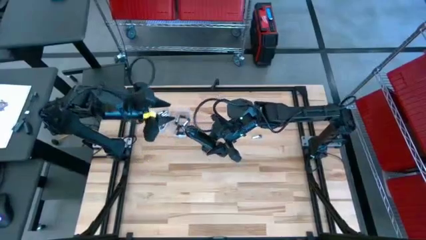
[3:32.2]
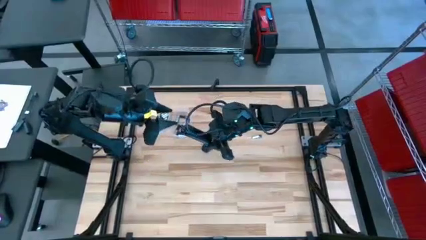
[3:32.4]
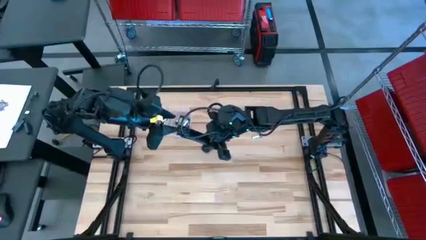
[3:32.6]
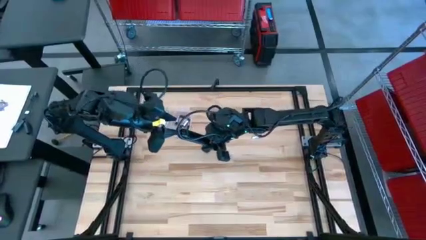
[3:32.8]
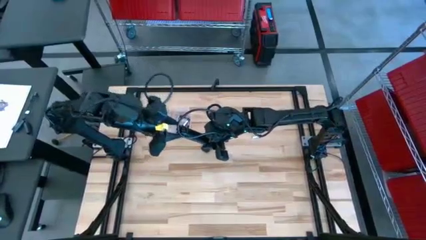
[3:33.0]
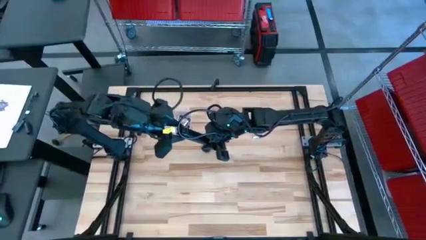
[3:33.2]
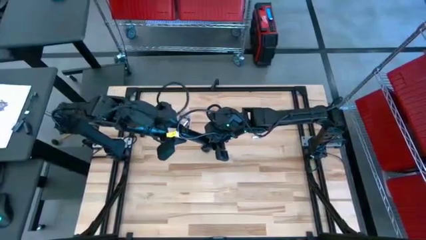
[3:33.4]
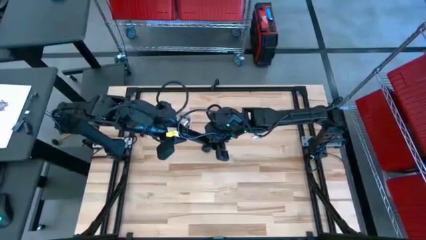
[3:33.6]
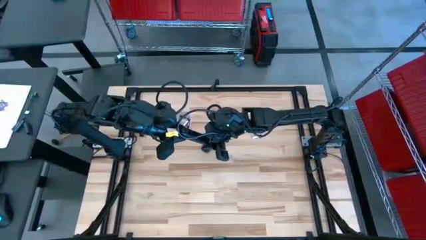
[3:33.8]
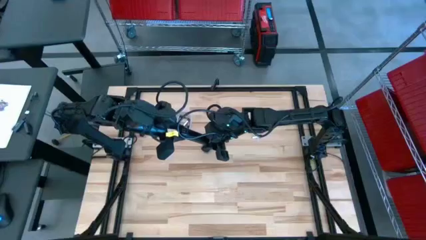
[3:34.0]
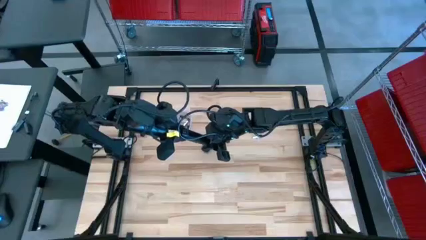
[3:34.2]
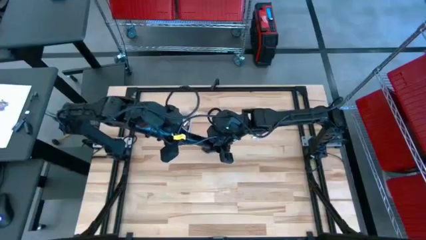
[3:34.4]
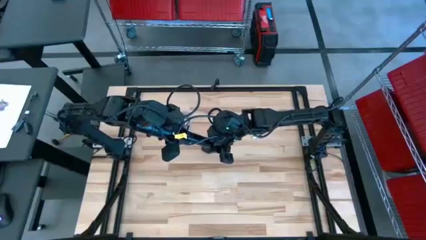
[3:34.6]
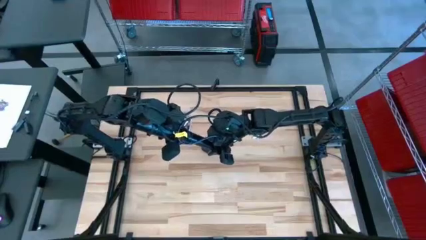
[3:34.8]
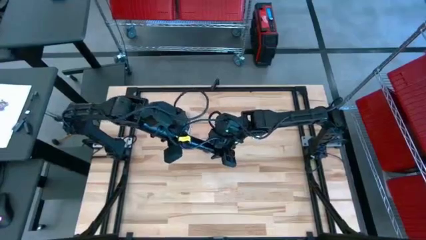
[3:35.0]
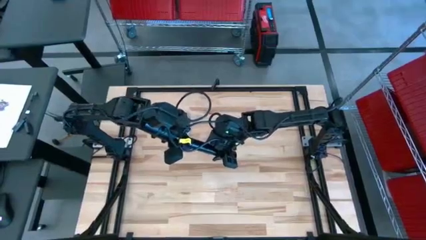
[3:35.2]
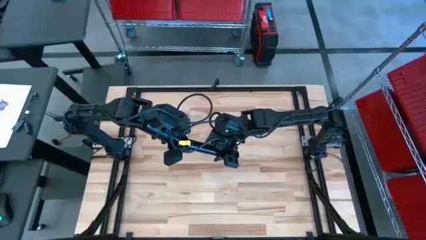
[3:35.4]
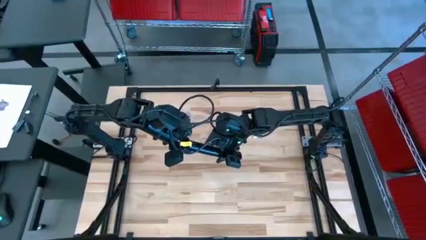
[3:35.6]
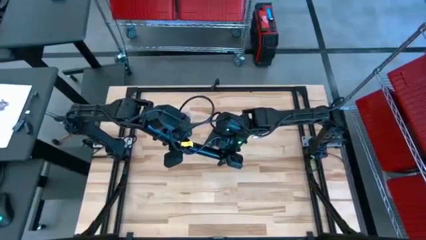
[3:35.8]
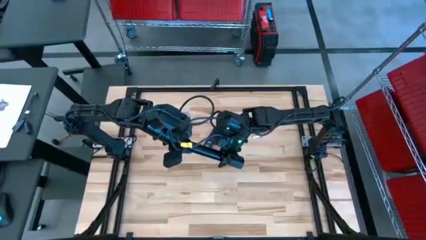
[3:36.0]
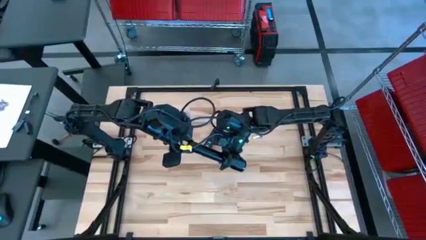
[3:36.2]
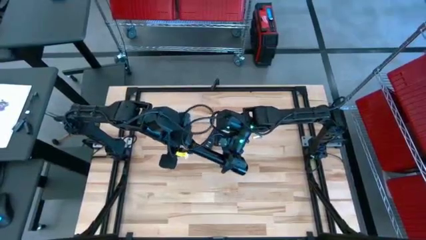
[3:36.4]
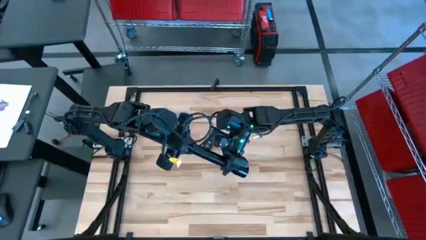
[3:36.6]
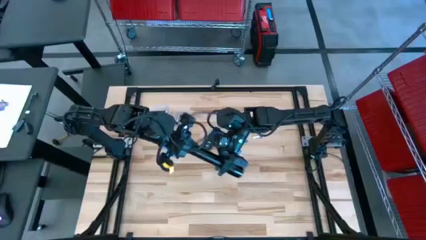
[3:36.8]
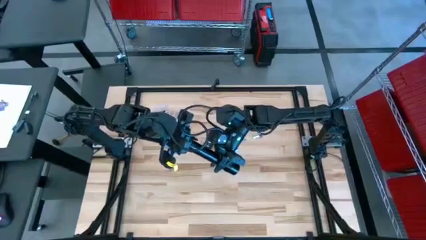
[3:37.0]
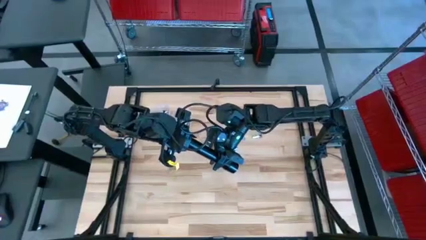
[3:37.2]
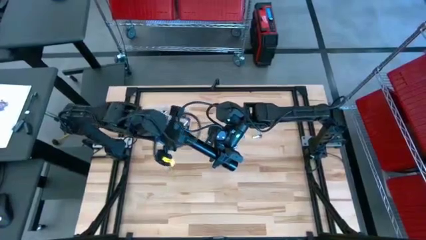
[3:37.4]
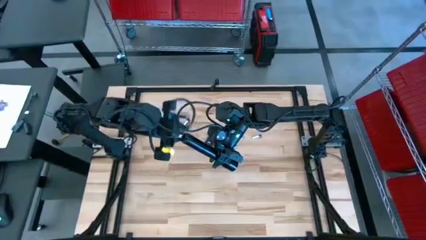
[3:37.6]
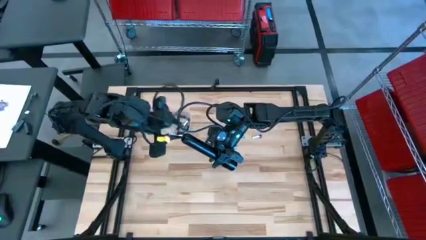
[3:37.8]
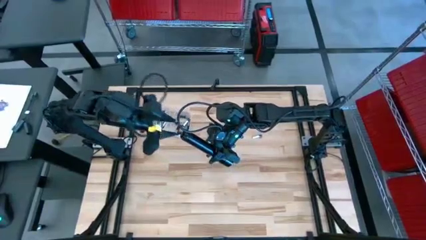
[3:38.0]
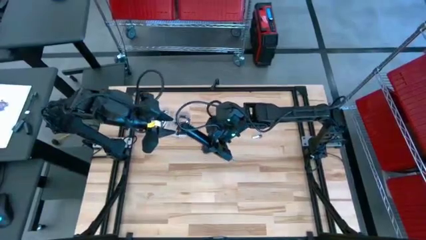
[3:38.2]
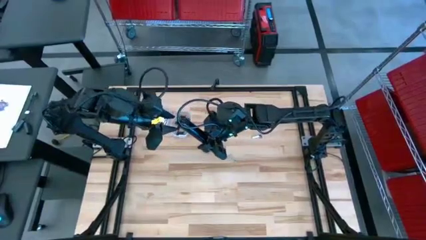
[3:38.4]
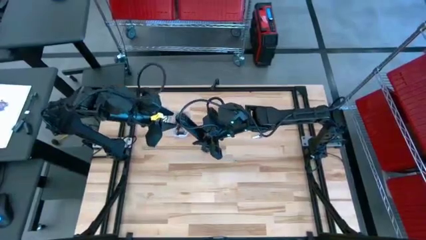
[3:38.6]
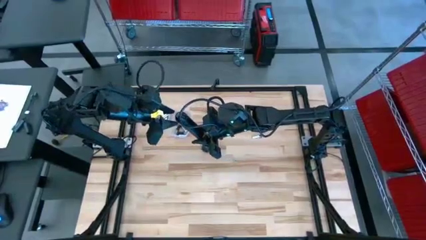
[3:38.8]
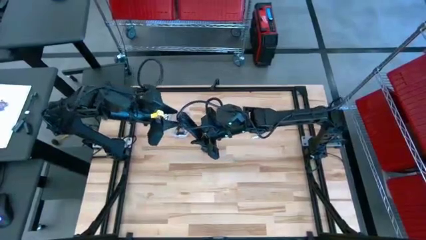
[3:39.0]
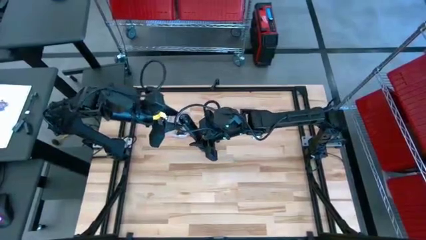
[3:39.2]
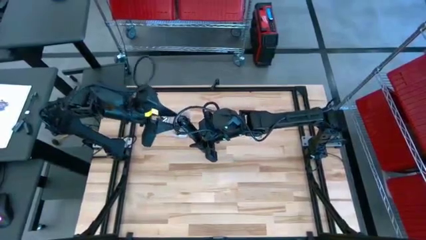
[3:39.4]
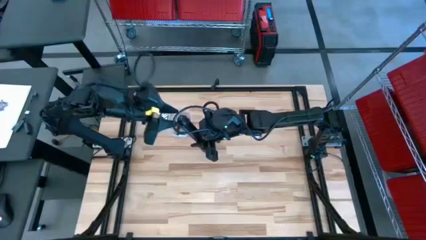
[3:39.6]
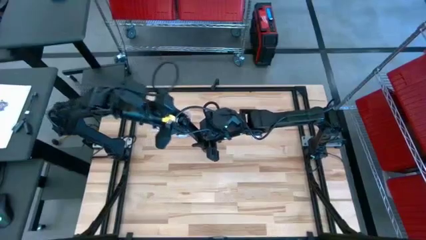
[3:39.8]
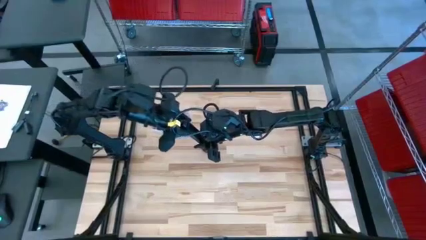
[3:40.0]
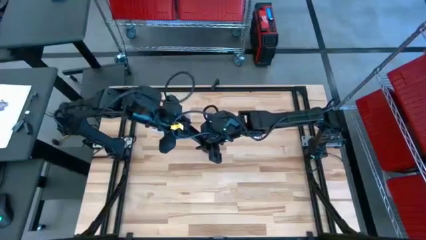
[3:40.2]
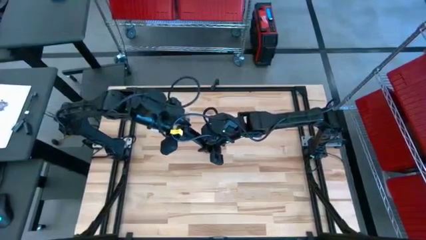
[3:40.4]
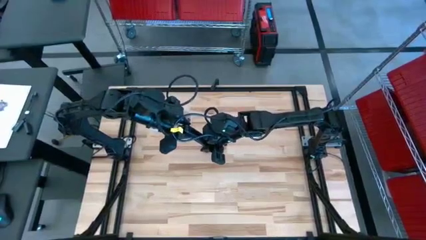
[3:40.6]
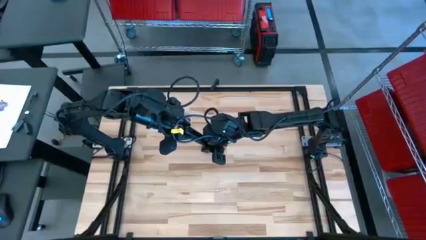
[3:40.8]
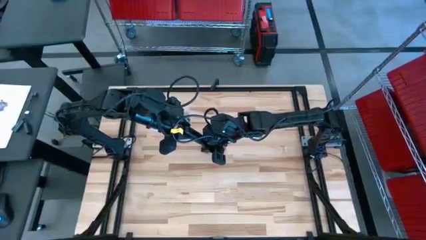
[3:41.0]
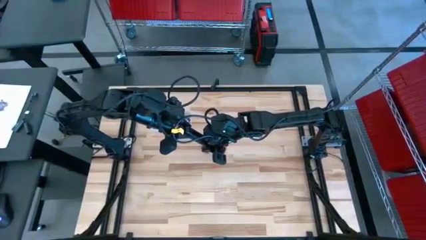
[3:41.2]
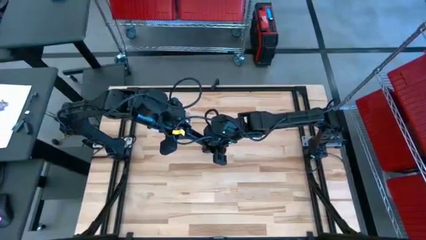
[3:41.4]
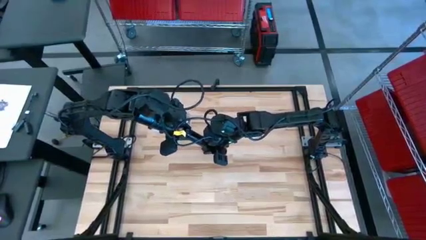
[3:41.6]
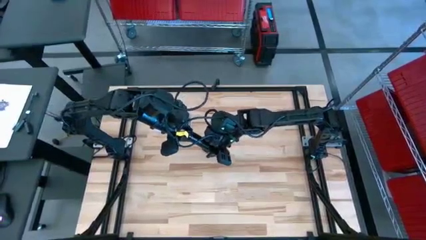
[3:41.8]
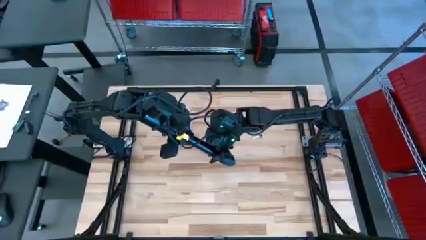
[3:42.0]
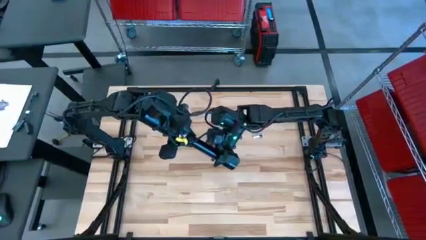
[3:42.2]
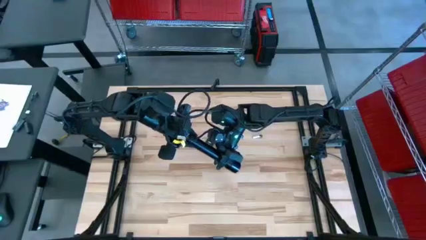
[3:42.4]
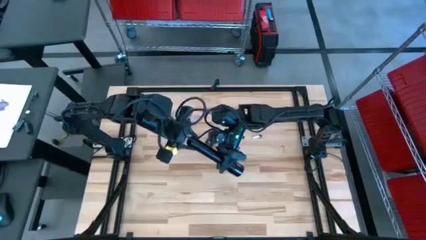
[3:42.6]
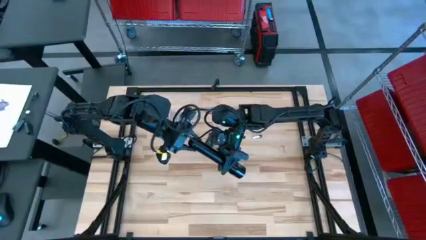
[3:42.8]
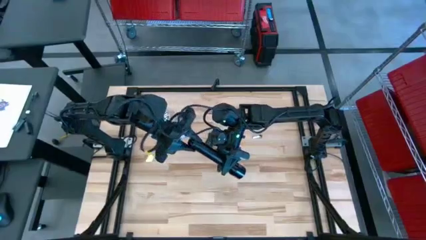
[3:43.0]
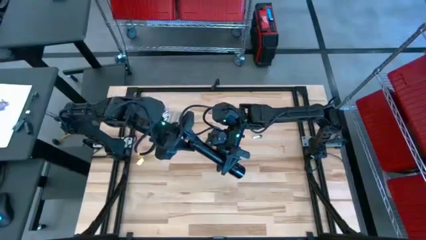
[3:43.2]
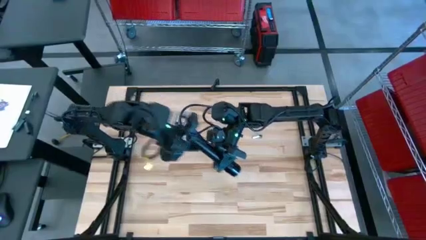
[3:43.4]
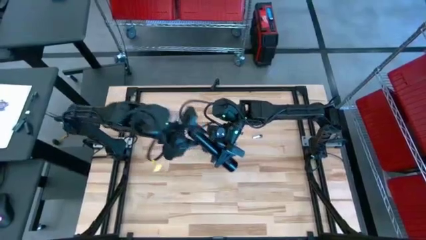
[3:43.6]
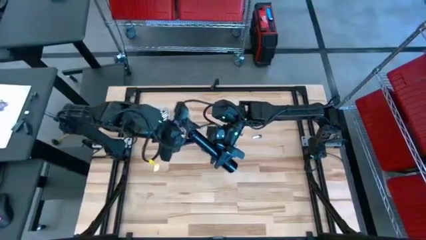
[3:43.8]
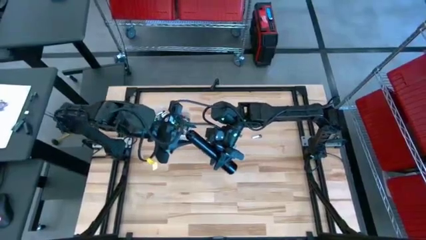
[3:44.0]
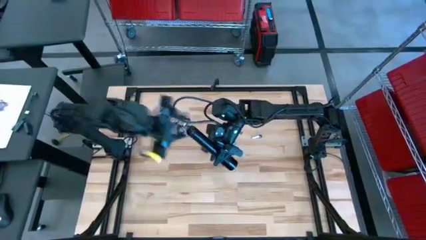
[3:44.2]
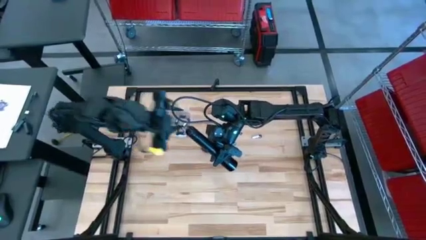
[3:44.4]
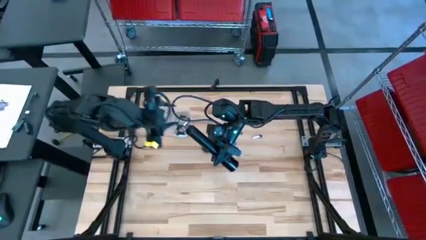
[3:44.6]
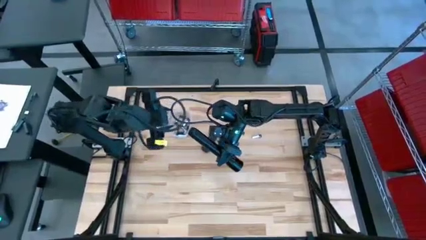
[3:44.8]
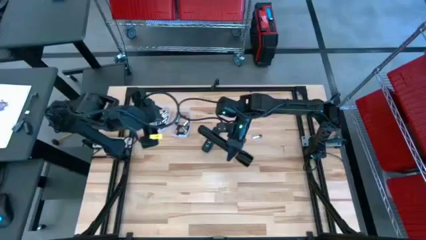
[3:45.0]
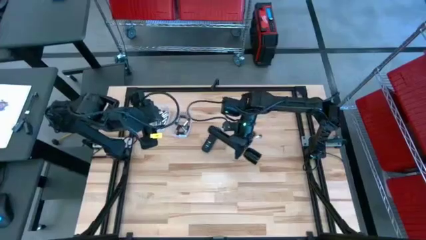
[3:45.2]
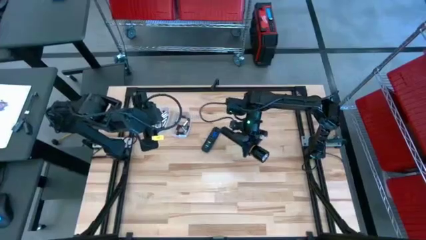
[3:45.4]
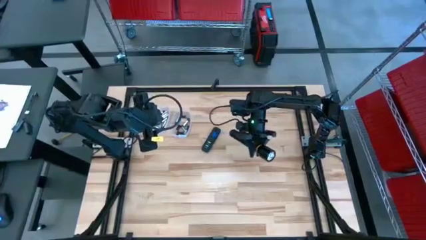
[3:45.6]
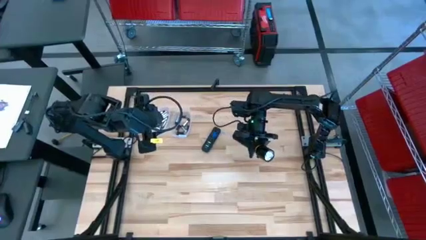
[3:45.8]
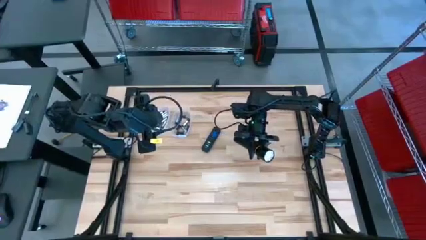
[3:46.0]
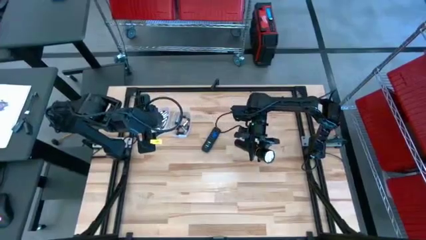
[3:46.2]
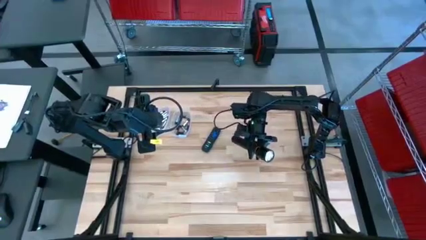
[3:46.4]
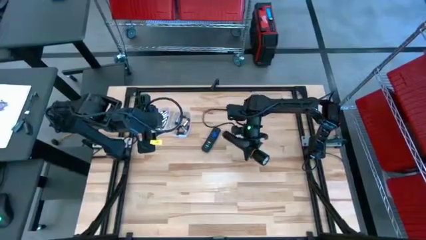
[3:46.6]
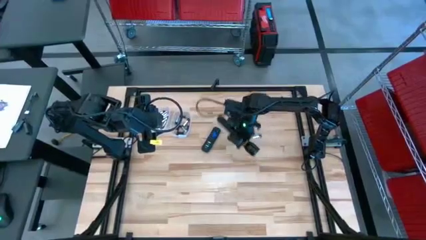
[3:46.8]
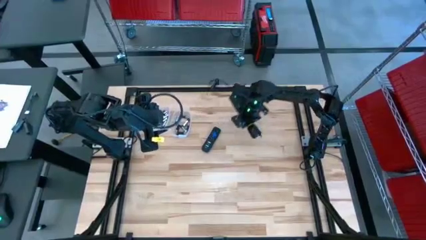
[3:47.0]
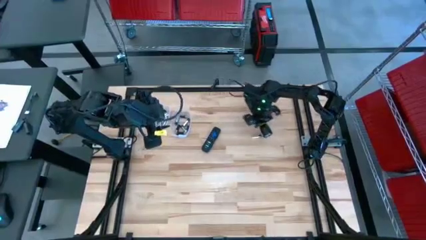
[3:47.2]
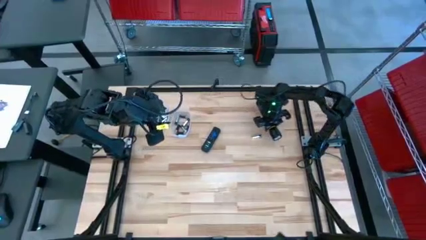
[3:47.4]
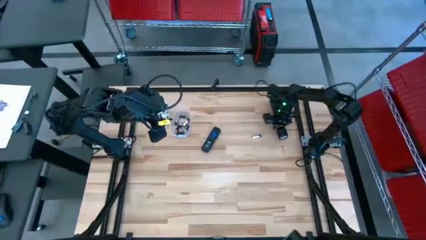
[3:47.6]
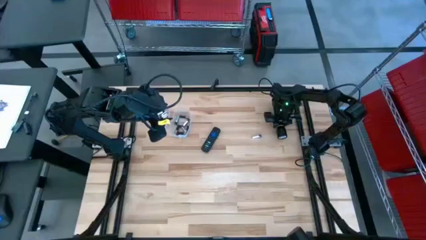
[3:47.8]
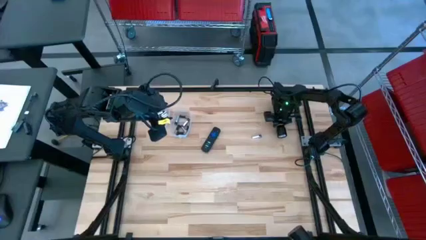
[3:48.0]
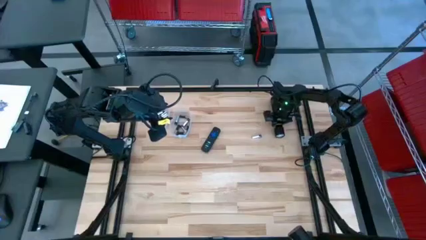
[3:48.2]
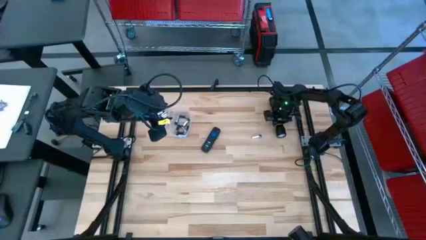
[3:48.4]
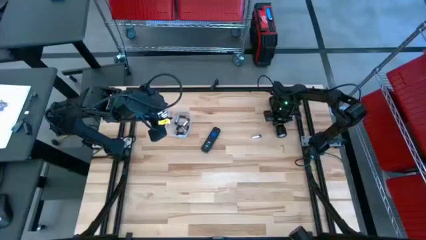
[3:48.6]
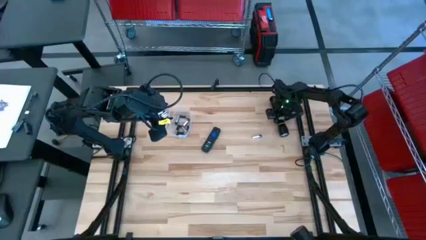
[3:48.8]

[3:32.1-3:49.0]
Task: Insert battery
Close the flashlight battery compartment
